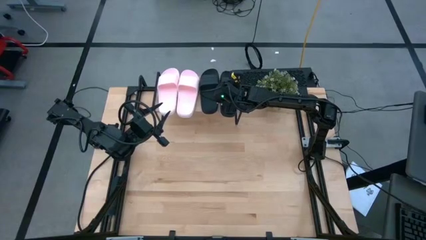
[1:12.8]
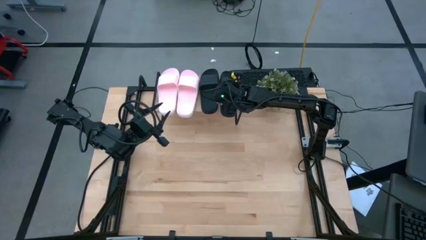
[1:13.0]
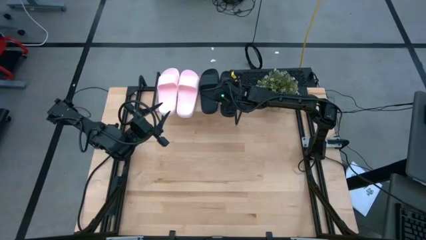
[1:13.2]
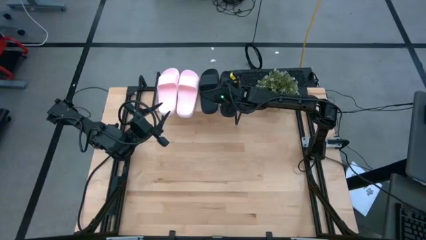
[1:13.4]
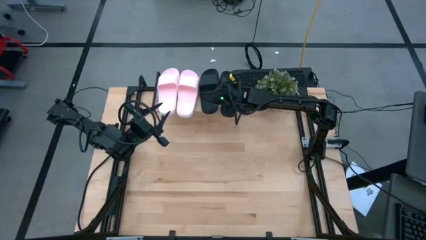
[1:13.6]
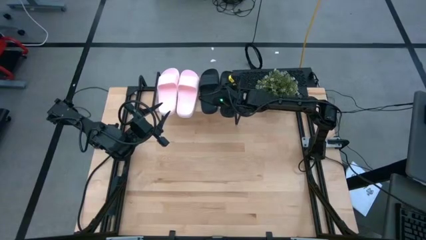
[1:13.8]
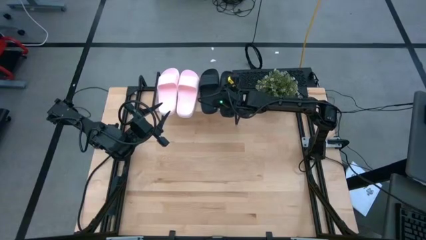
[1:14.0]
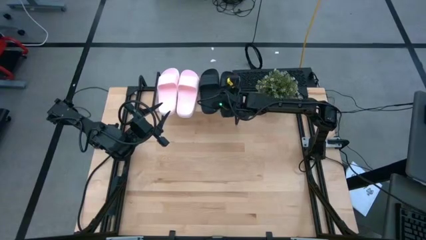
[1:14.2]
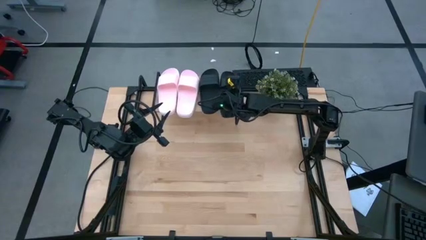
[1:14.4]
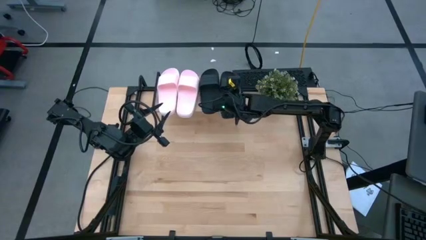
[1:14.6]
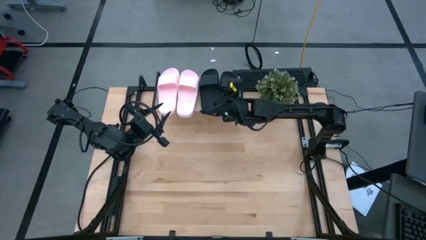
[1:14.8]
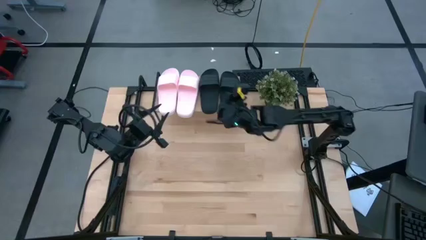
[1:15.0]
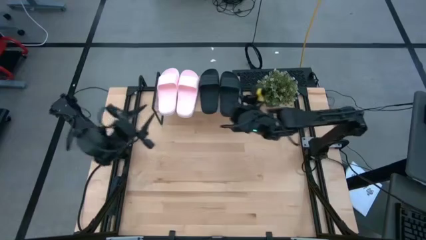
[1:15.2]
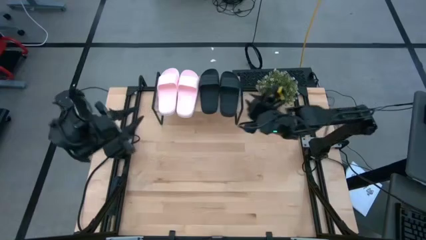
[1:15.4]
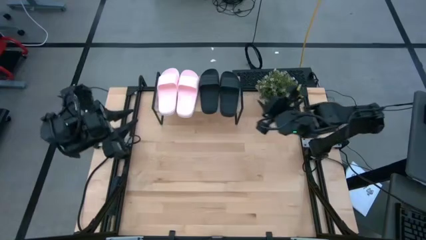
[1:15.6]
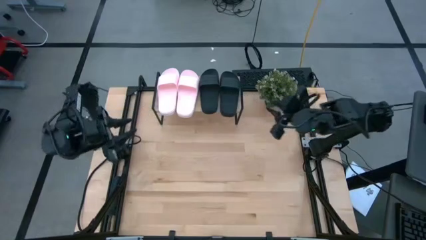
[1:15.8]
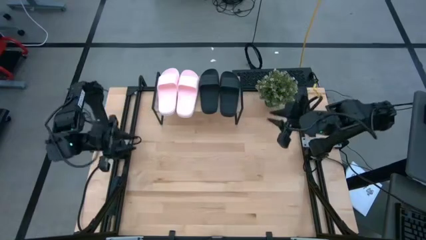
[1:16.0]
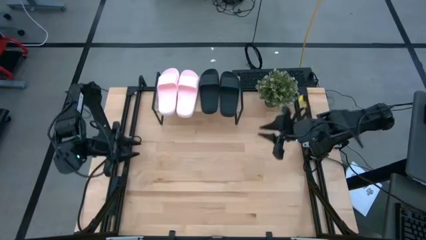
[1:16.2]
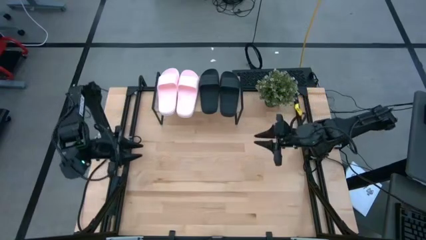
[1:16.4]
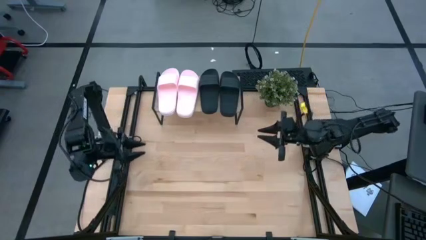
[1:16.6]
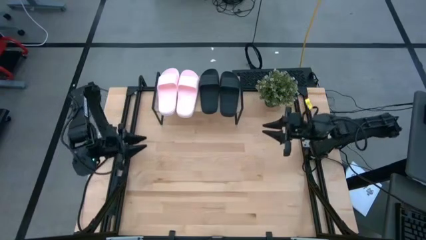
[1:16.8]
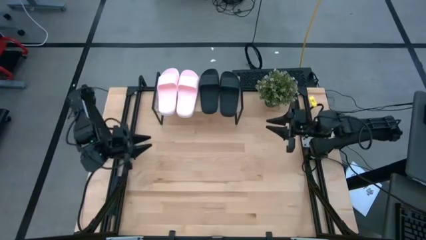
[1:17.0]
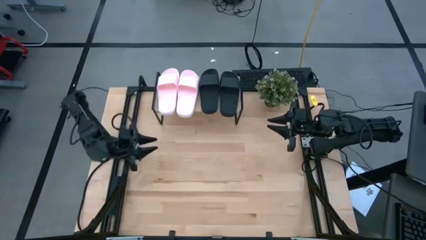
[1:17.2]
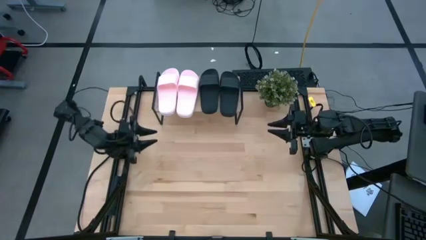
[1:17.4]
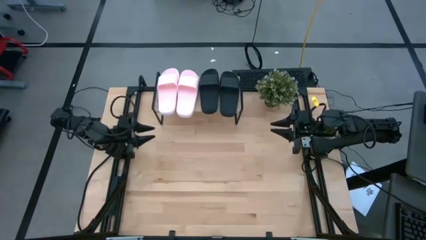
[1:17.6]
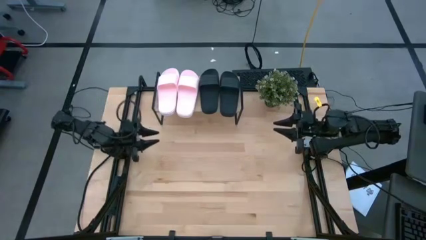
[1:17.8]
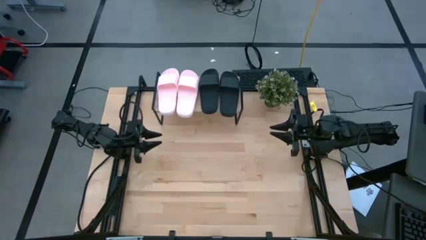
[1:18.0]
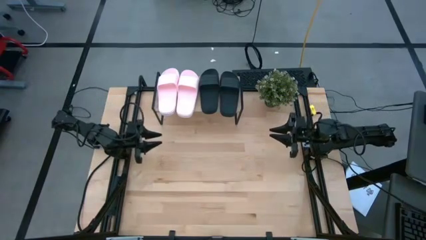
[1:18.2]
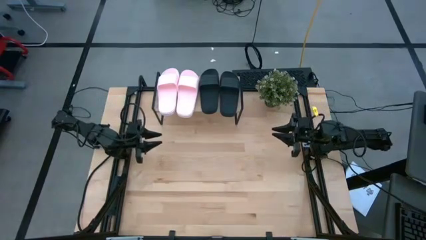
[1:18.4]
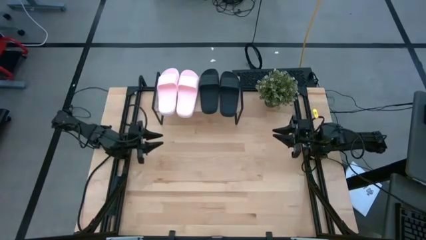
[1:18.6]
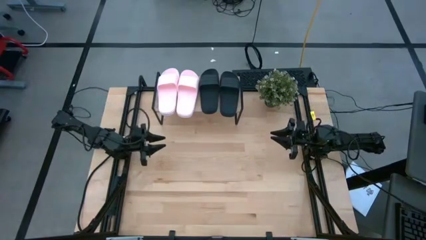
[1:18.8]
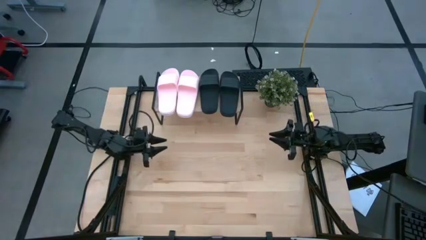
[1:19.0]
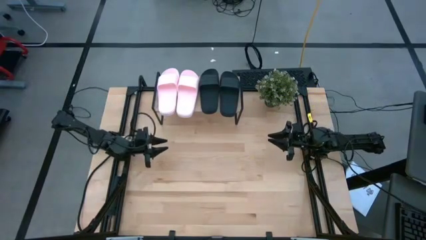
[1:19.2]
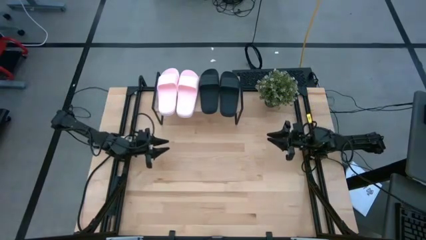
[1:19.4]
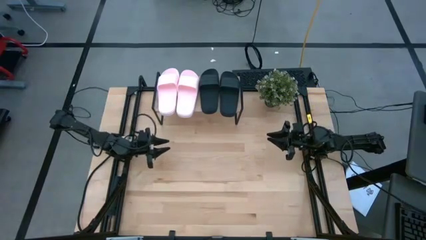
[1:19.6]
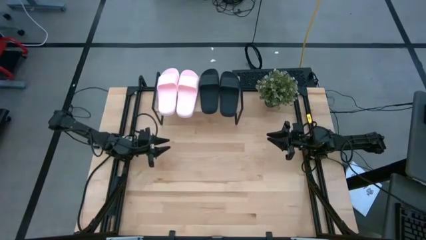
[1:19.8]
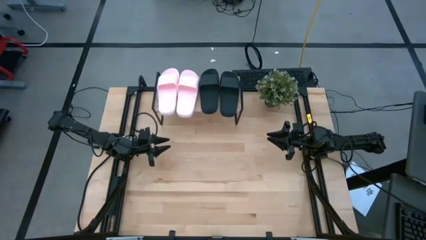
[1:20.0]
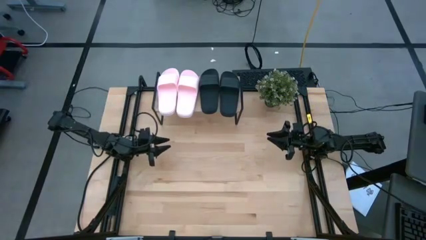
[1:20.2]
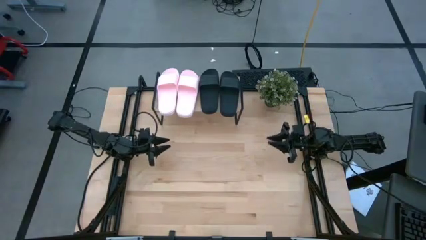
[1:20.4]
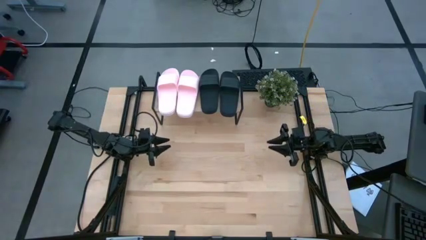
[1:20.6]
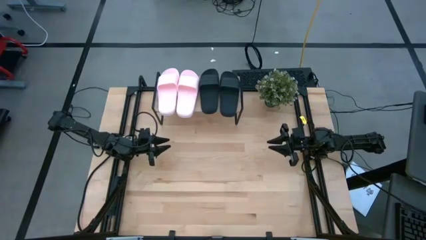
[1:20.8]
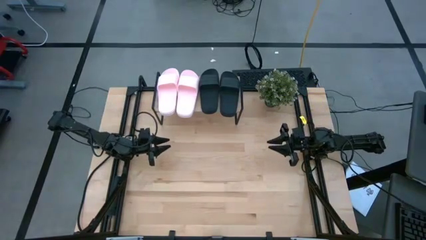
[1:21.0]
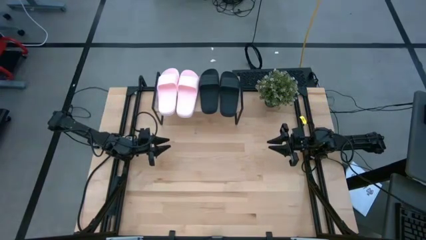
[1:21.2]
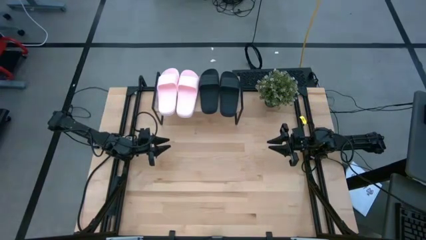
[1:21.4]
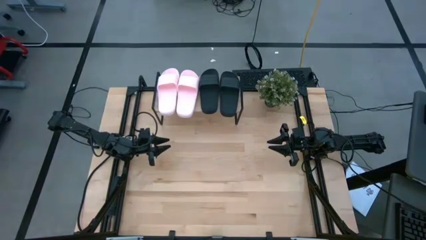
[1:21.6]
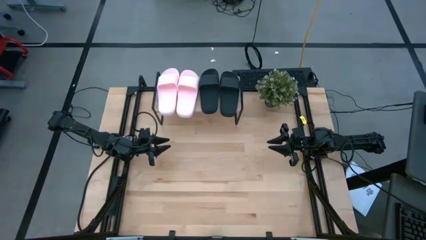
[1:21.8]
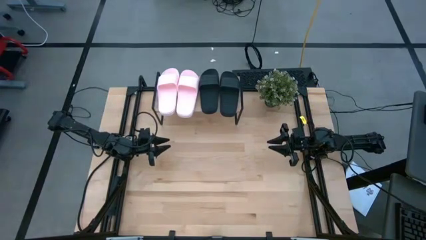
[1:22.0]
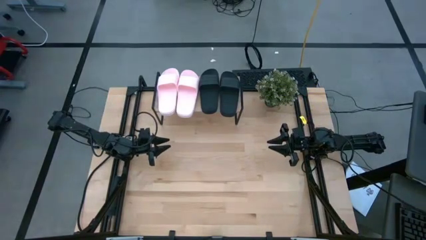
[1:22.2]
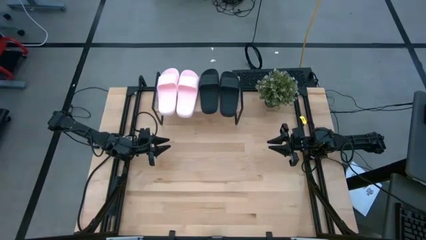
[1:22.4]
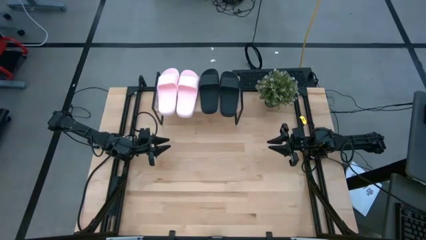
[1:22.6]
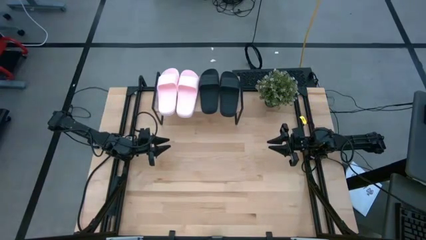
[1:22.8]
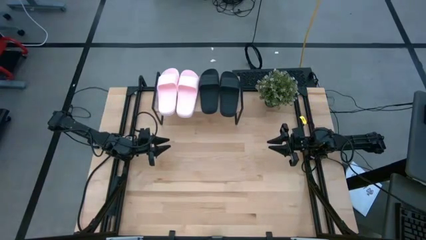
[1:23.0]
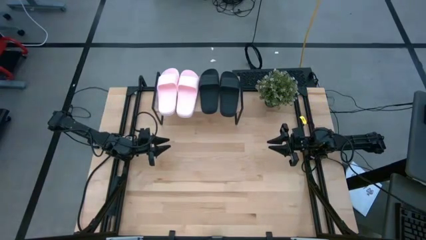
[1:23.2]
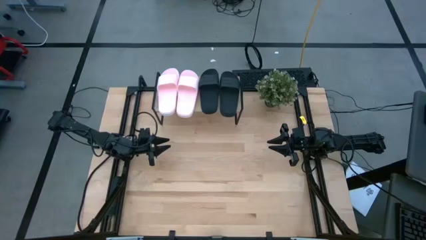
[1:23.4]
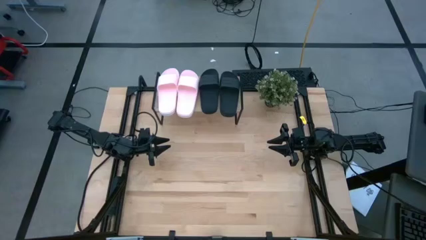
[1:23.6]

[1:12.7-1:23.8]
Task: Pick and place slides into the shelf
Return to Home Position

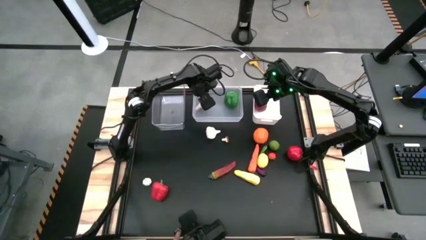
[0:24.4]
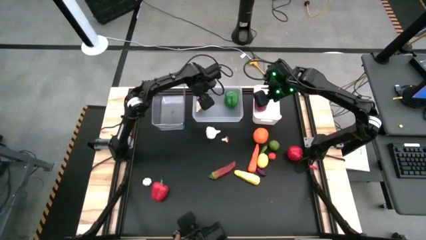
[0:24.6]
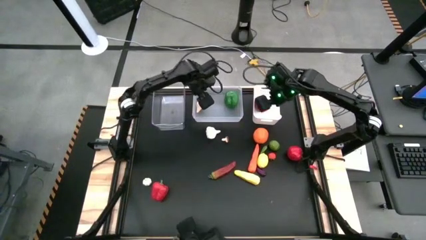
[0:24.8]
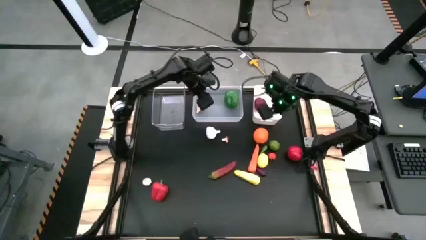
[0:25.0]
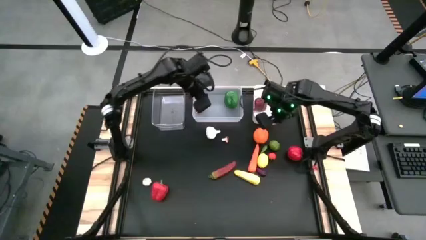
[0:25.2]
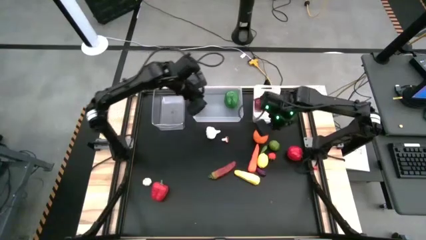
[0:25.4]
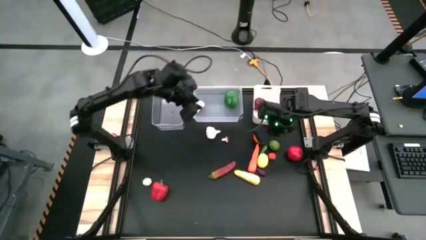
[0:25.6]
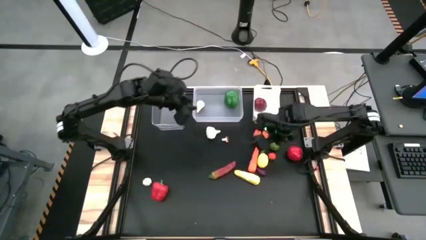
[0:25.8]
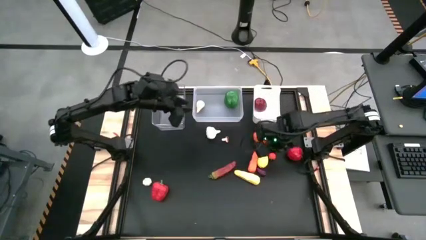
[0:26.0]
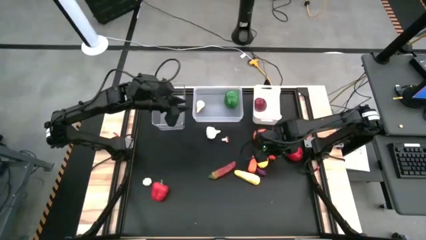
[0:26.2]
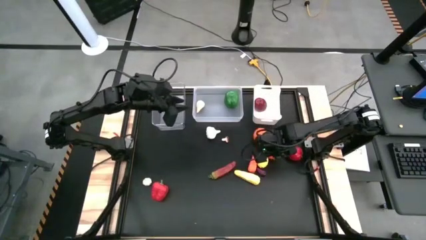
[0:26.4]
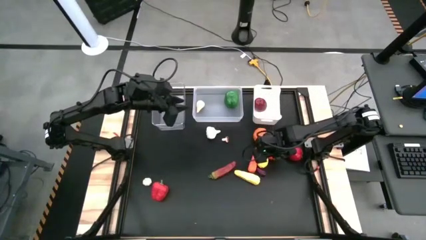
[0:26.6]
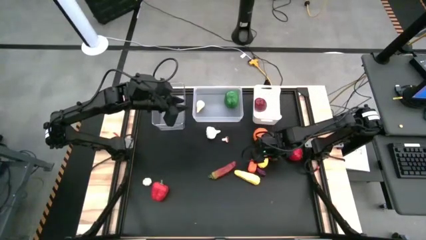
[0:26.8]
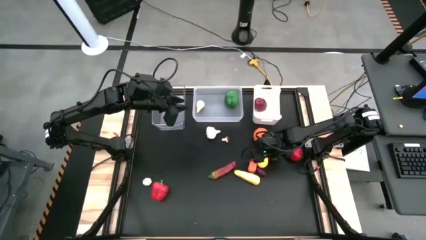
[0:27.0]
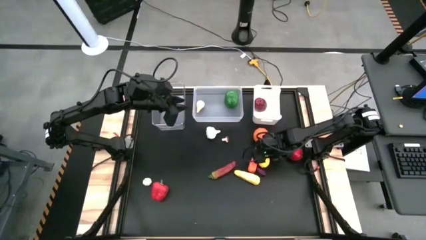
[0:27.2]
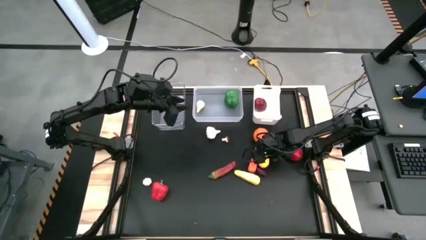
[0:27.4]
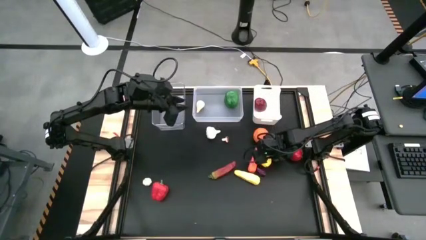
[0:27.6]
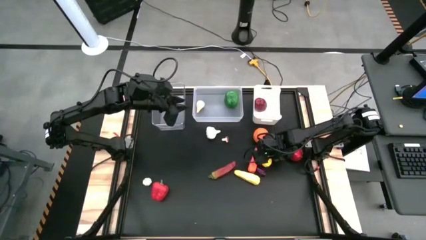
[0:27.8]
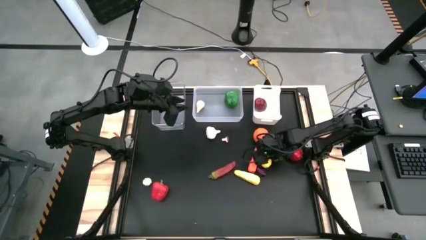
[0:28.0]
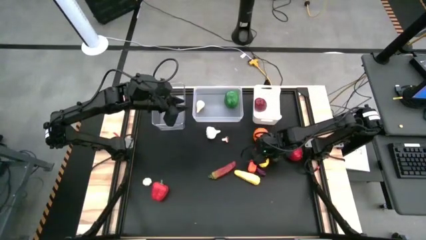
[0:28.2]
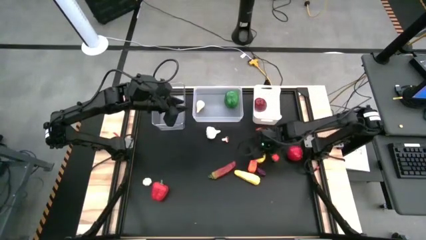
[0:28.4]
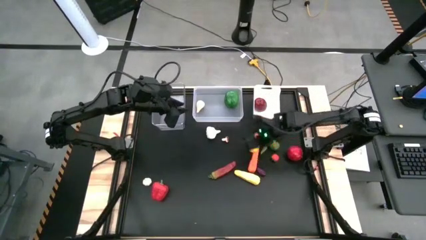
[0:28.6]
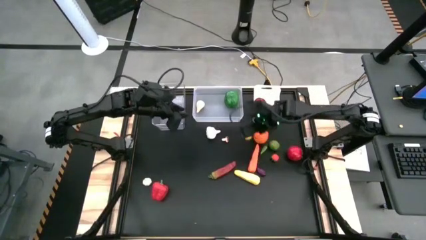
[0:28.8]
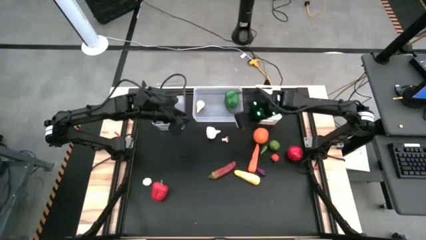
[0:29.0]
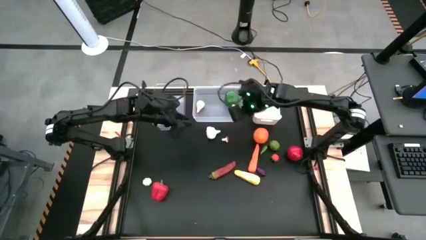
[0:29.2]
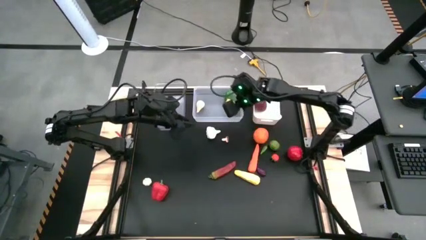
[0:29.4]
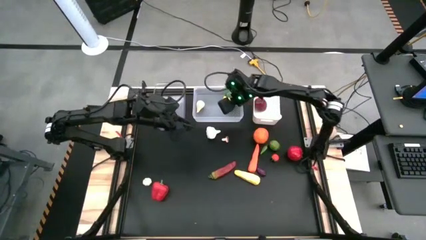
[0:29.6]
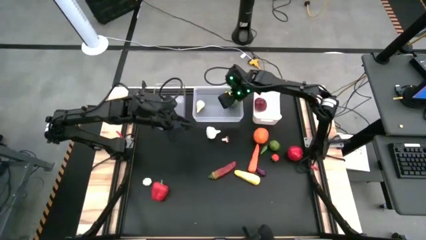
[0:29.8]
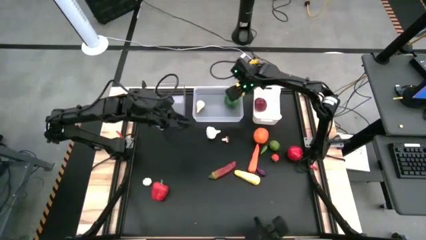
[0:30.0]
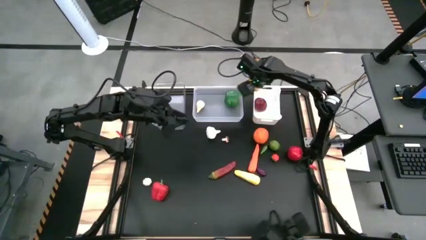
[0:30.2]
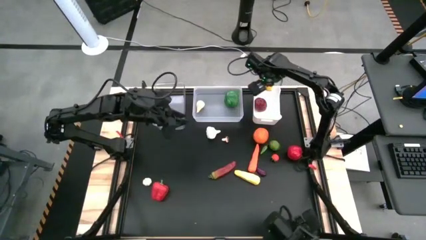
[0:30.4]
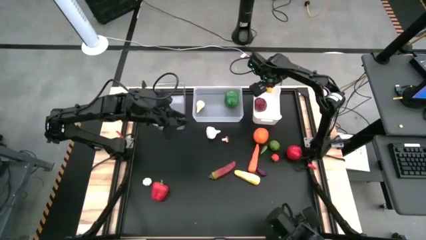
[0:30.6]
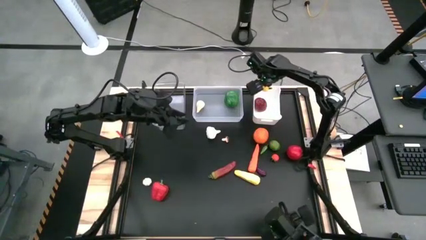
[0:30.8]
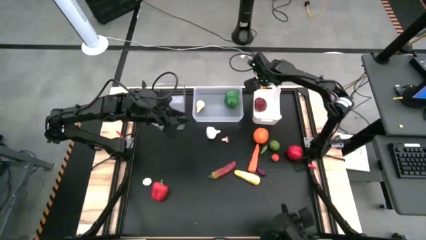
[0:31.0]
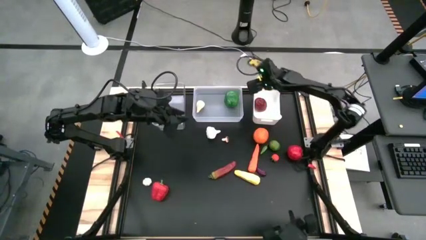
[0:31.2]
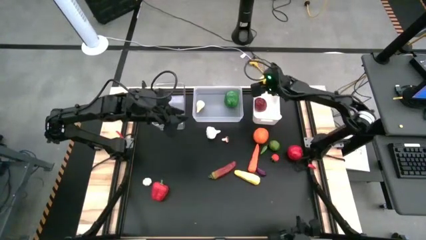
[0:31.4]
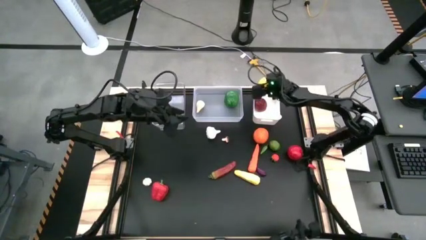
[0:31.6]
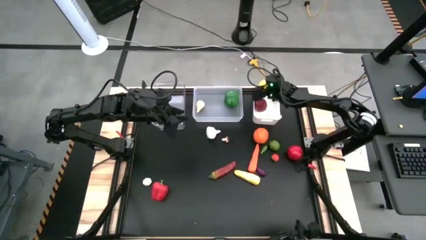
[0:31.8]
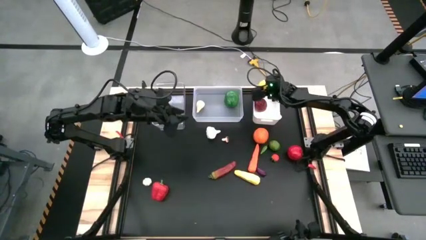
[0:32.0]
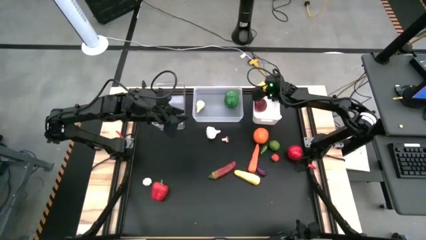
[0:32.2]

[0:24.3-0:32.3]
Task: Sort produce into baskets
Put the yellow lemon into the white bin
